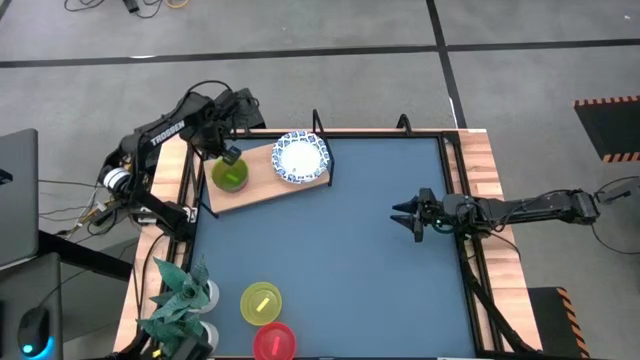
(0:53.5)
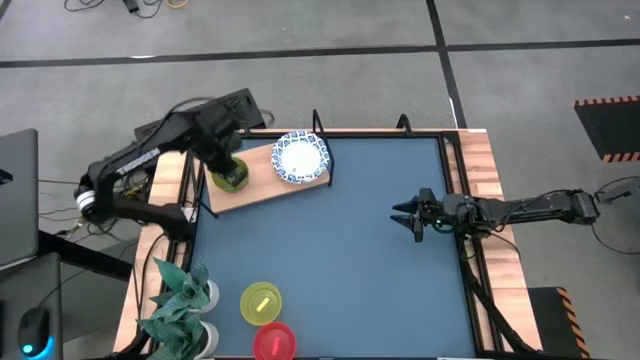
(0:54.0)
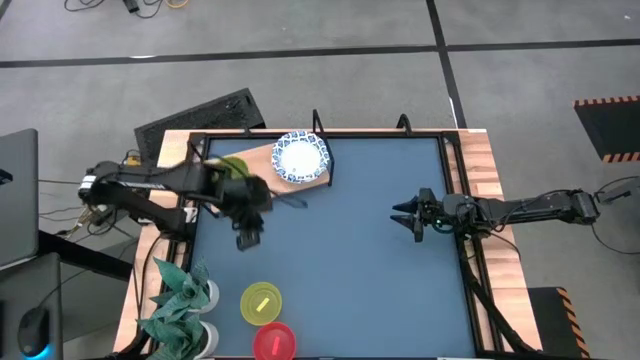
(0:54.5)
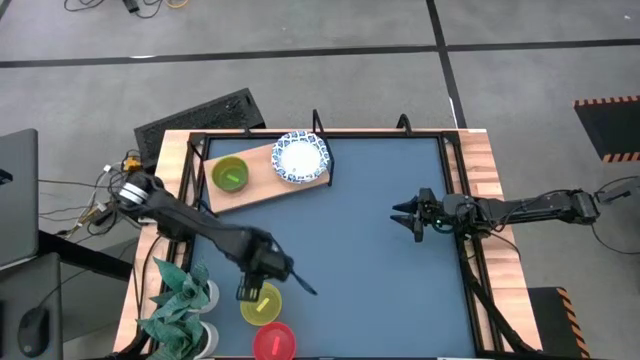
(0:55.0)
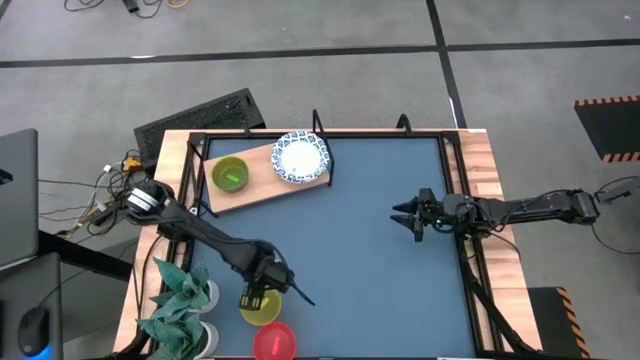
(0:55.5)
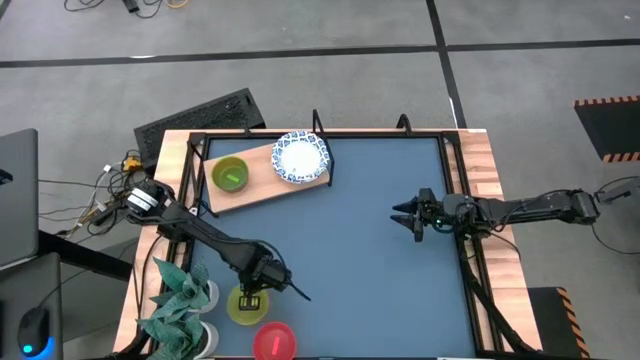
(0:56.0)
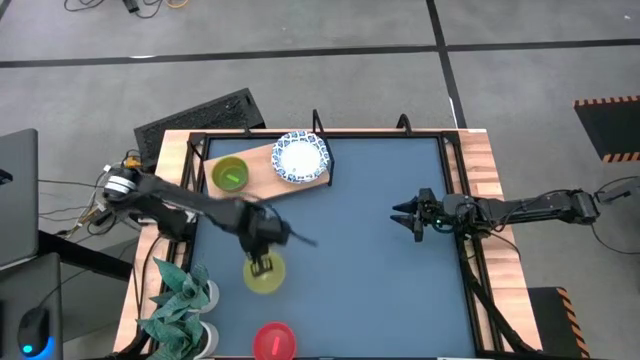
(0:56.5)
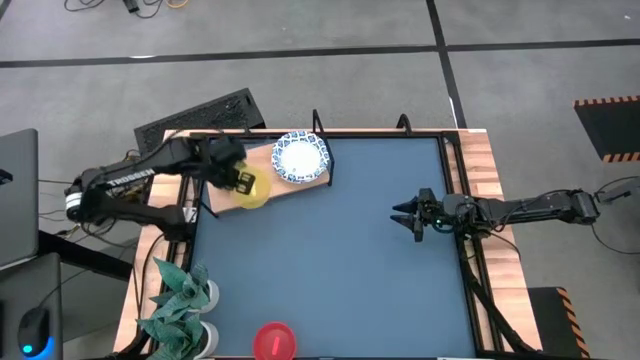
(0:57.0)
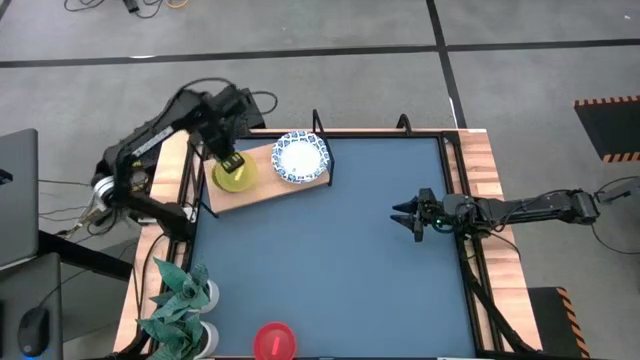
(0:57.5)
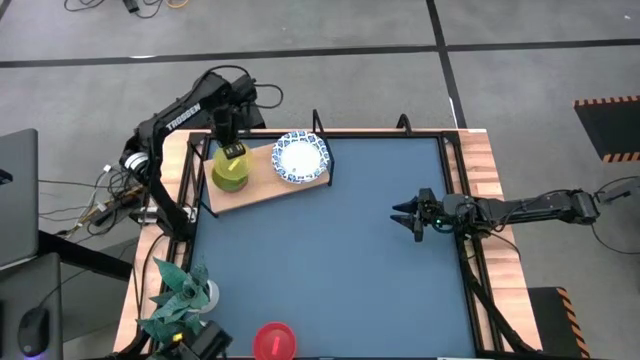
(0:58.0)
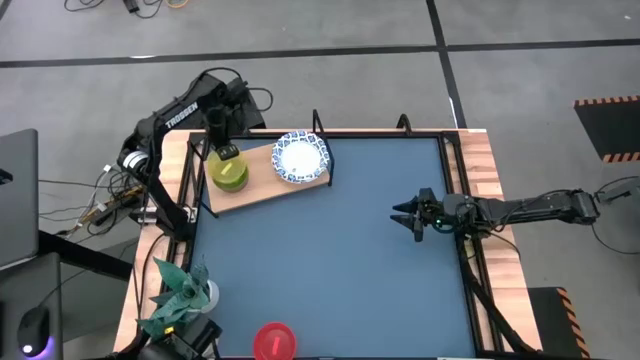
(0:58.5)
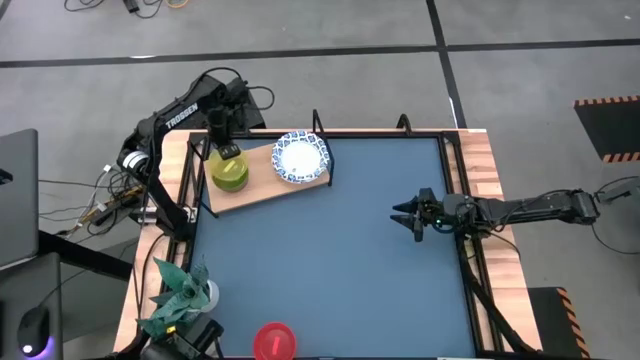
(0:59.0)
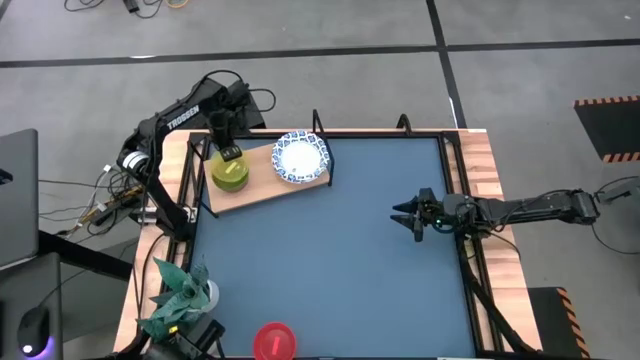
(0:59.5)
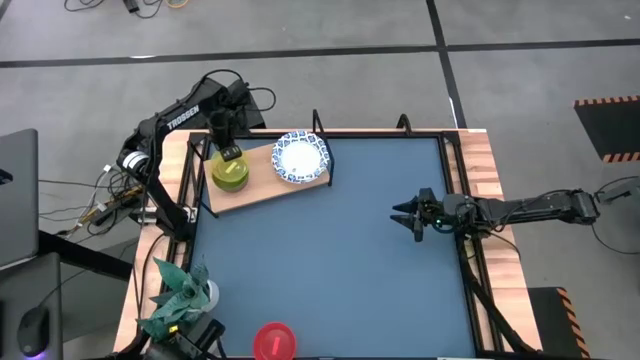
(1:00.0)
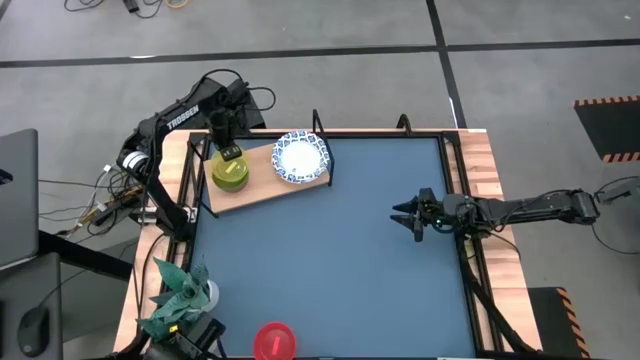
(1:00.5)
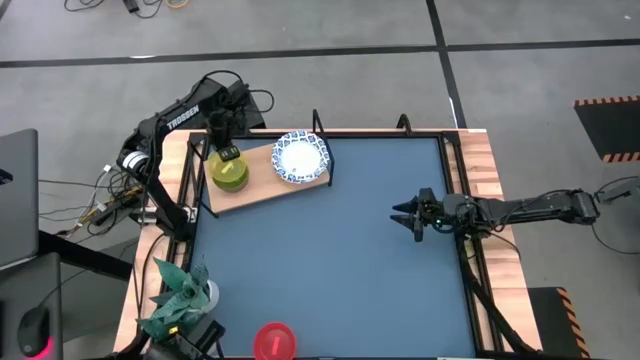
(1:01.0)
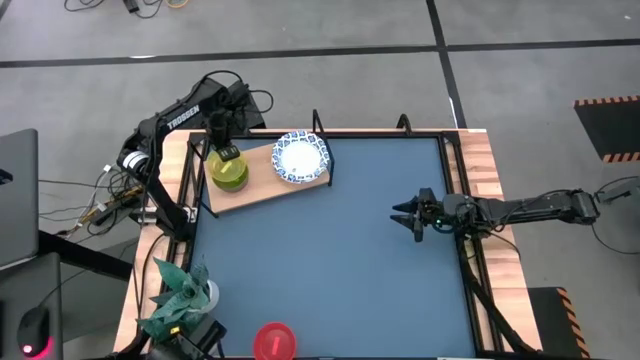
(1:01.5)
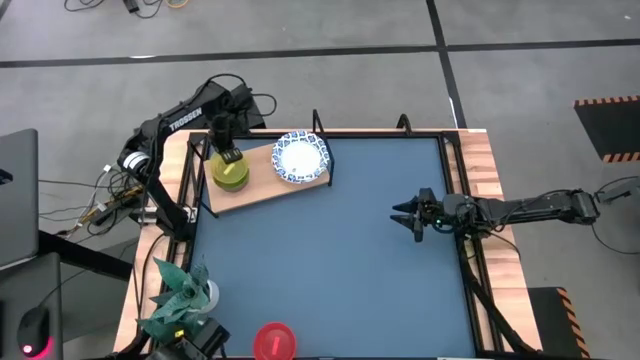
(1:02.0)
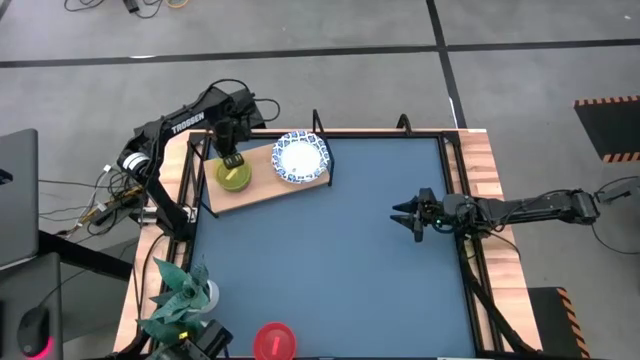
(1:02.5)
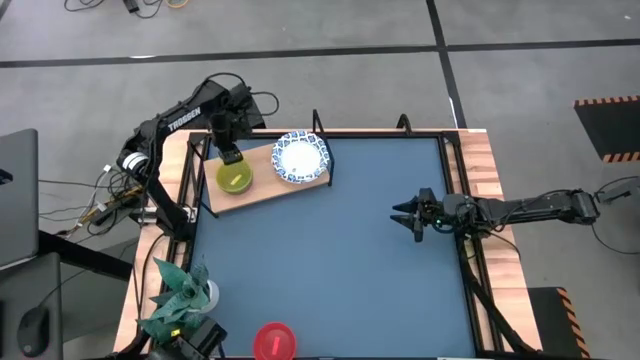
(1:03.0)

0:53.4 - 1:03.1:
Task: Place and stack bowls onto a shelf
Stack the yellow bowl on top of the other green bowl on the shelf

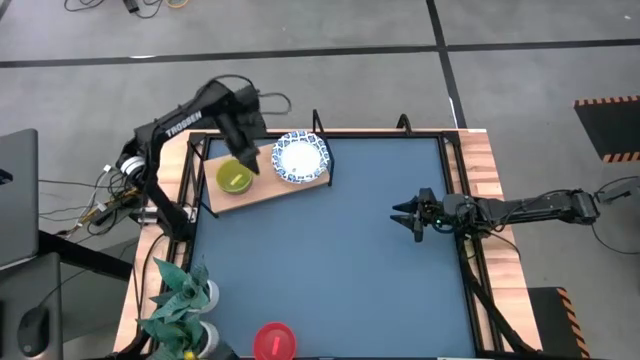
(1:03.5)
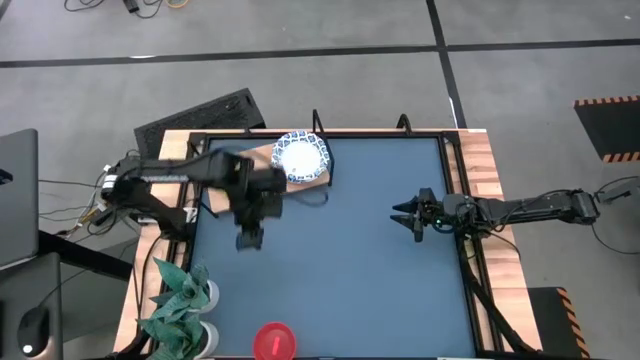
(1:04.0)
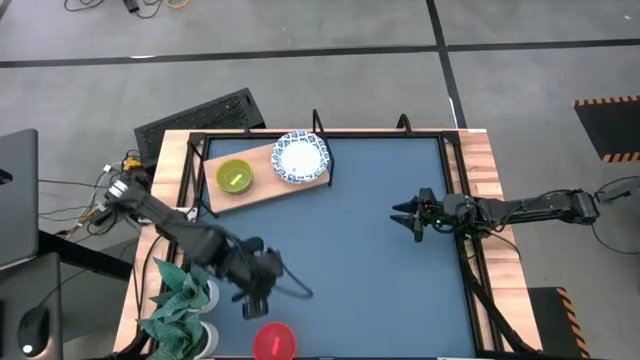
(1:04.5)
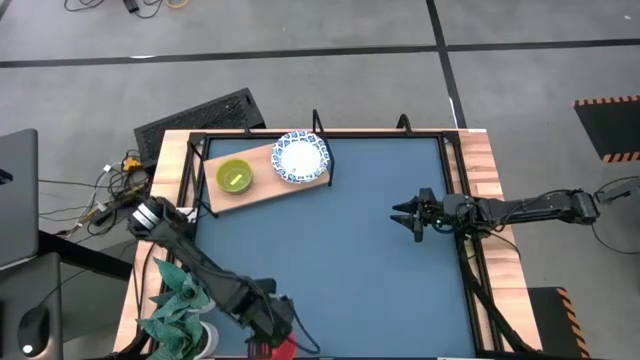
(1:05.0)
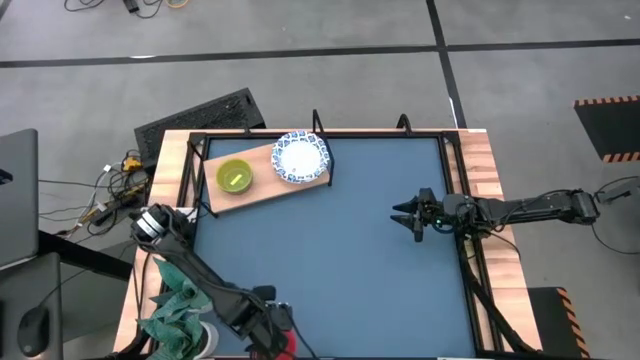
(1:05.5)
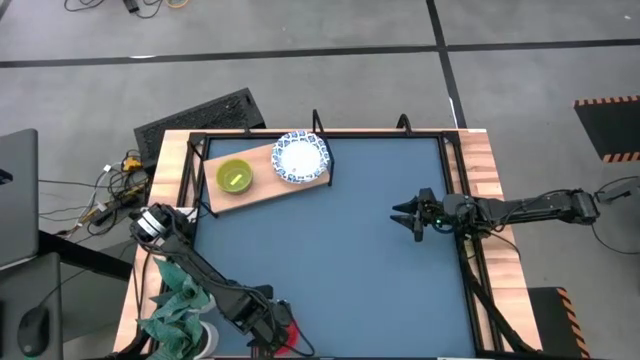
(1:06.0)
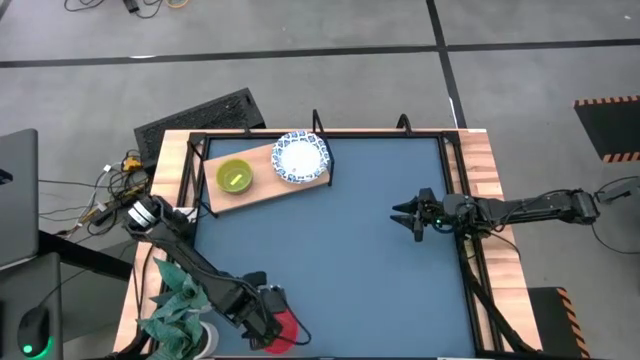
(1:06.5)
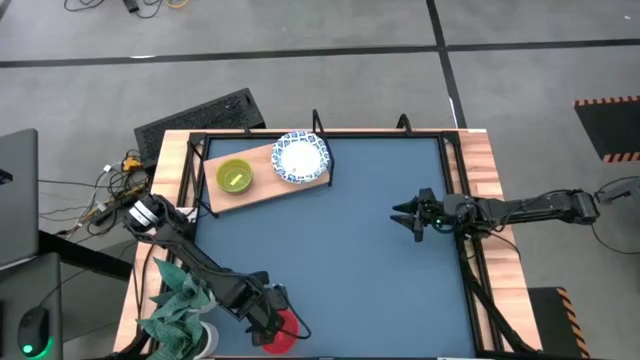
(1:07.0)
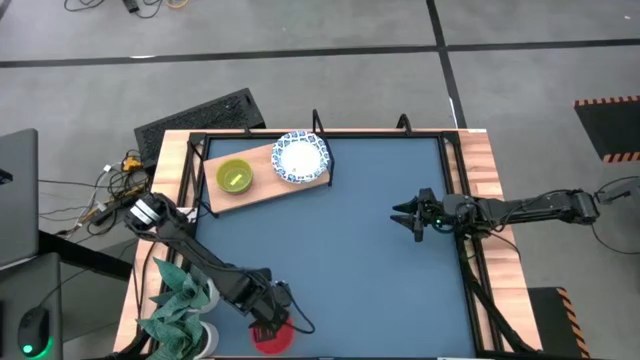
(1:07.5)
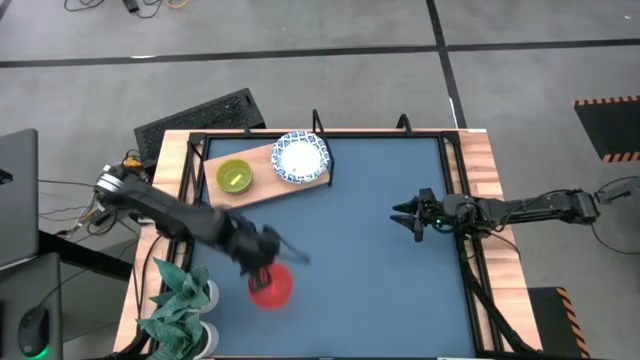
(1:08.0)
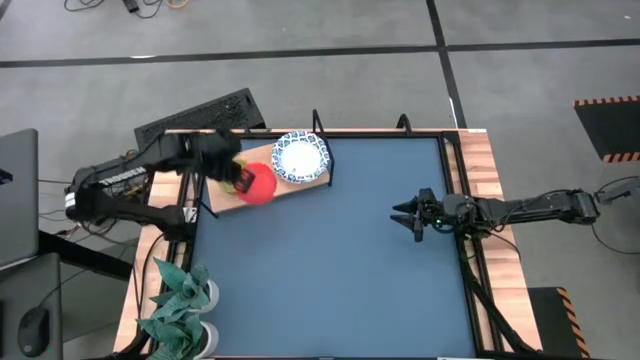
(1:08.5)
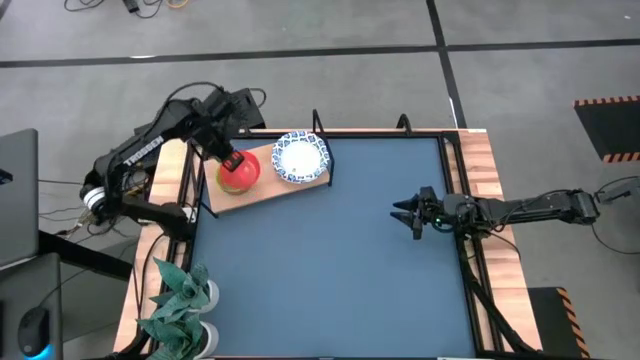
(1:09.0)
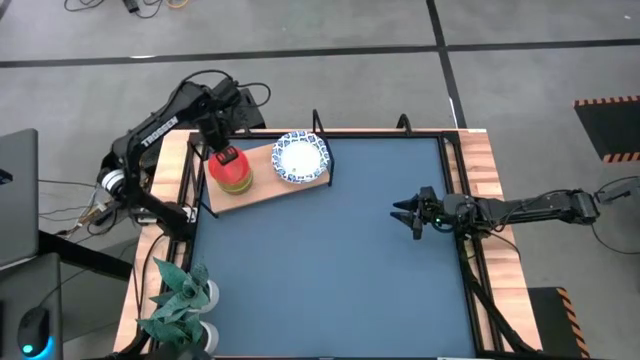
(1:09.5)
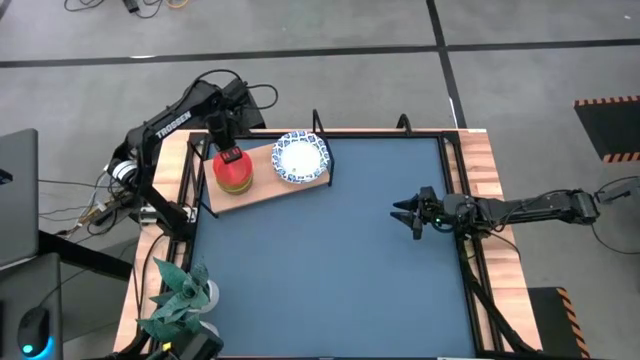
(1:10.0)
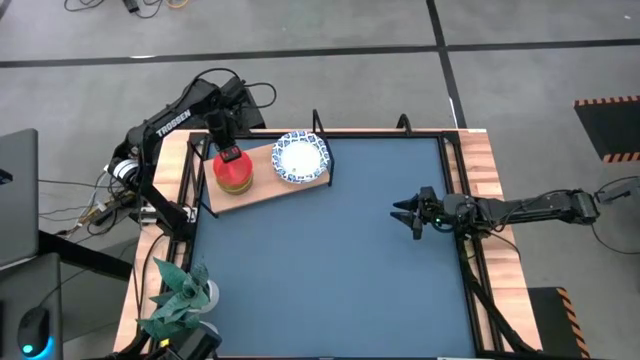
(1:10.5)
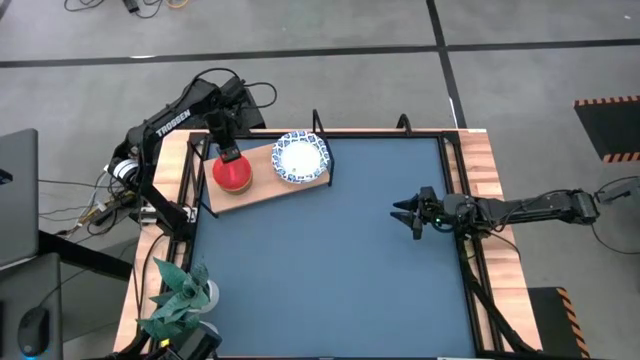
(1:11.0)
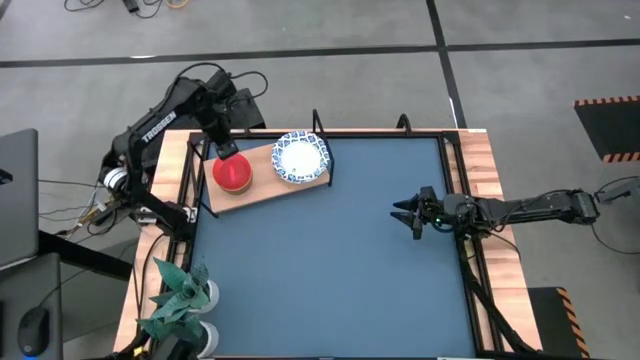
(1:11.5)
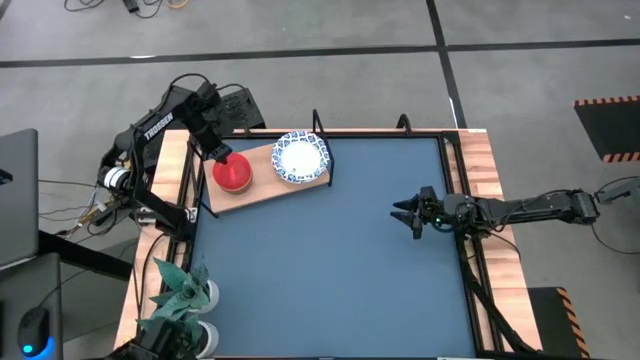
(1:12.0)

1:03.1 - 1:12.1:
Stack the red bowl on top of the other yellow bowl on the shelf

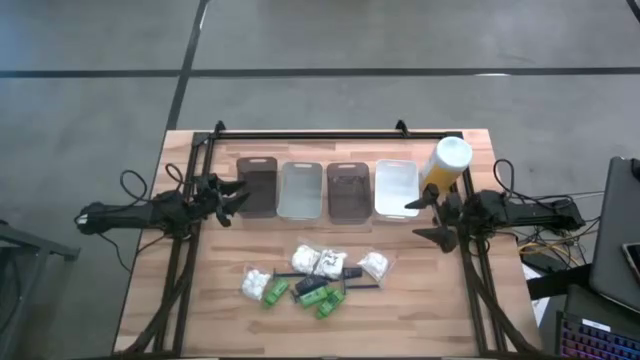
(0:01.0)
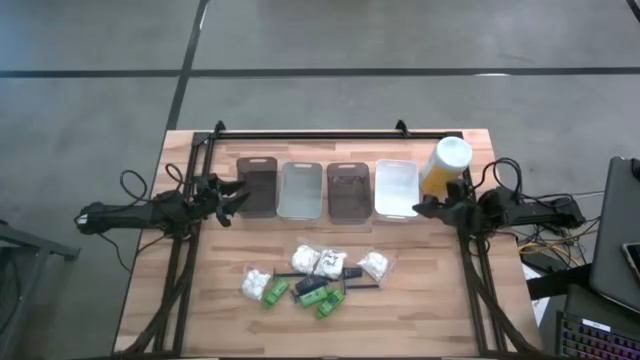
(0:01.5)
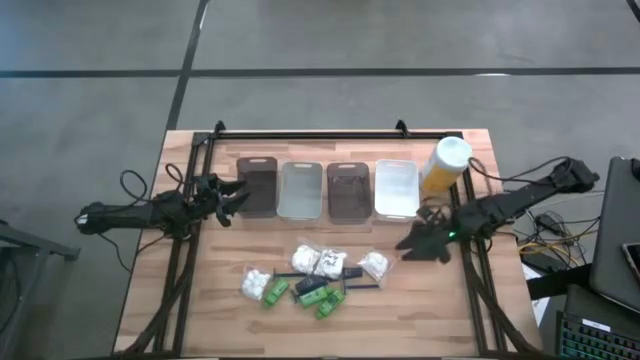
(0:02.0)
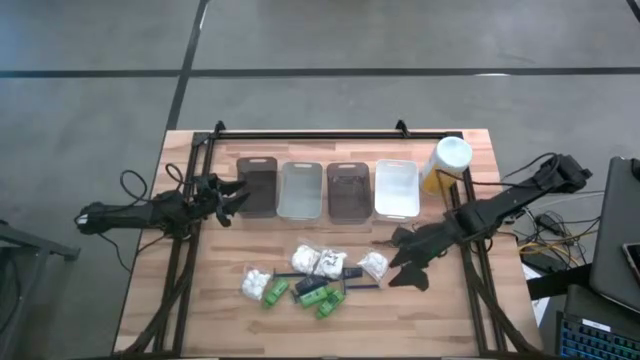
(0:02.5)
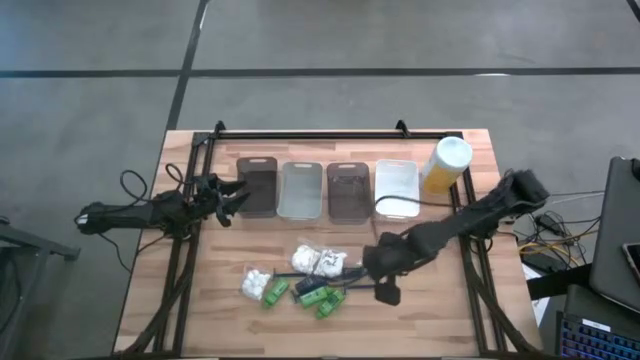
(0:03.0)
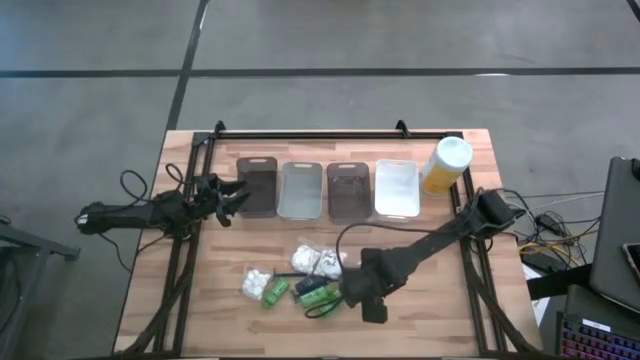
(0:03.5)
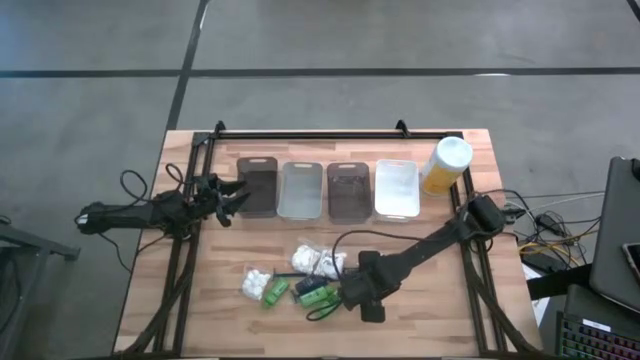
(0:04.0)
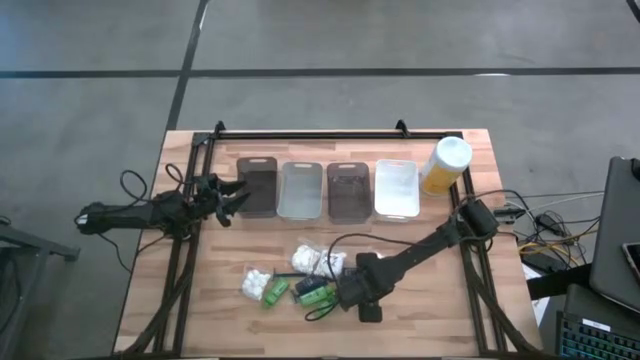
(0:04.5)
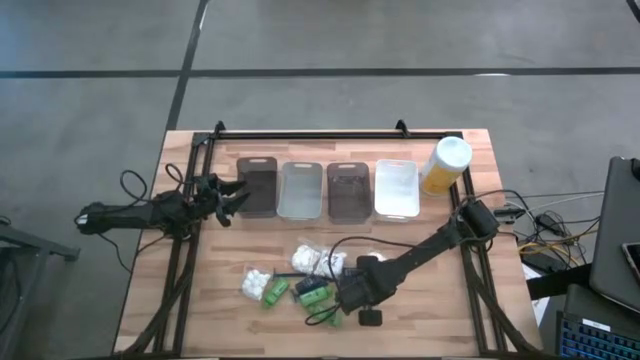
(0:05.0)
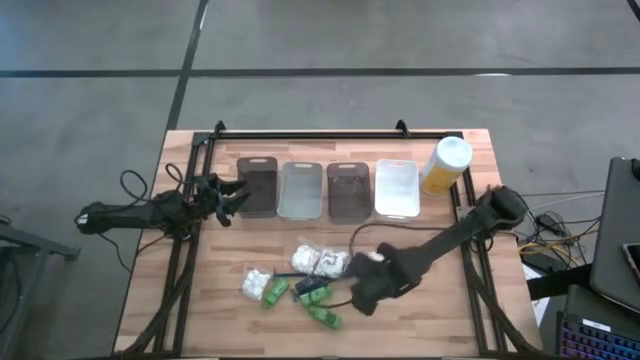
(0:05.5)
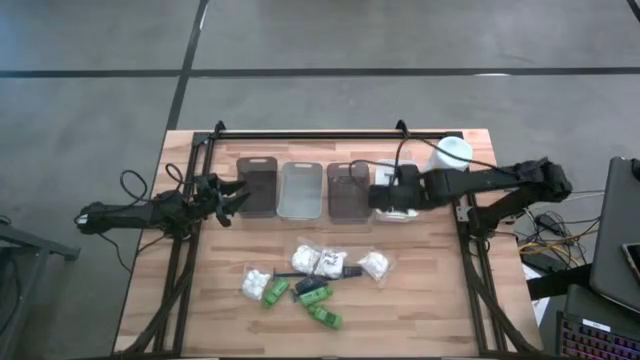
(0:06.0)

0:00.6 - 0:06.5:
Task: Pick & Place Travel size toiletries
Put the blue razor into the white bin
